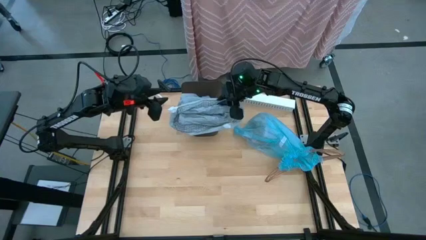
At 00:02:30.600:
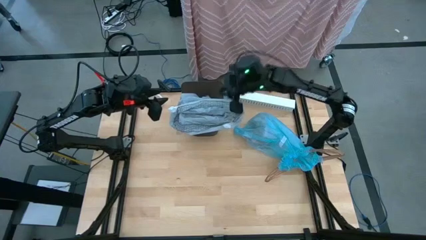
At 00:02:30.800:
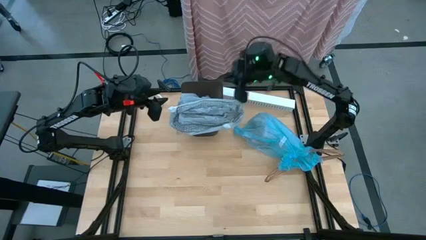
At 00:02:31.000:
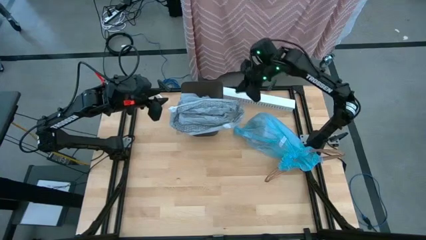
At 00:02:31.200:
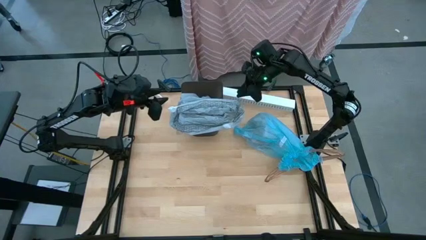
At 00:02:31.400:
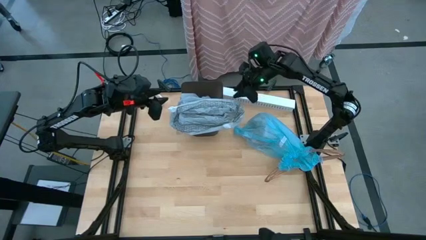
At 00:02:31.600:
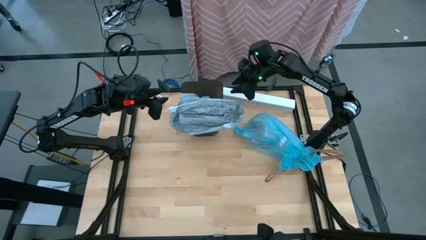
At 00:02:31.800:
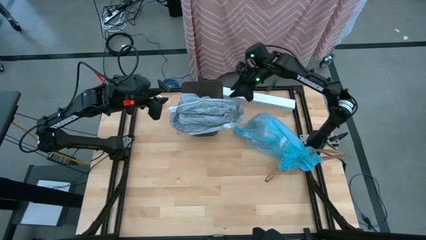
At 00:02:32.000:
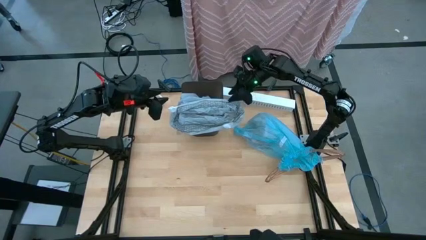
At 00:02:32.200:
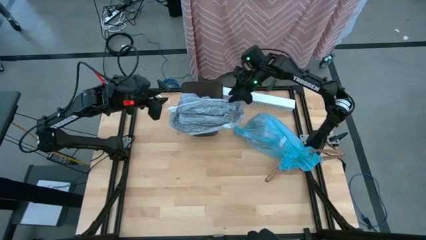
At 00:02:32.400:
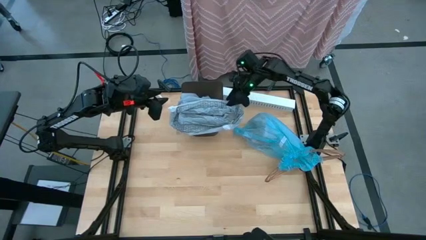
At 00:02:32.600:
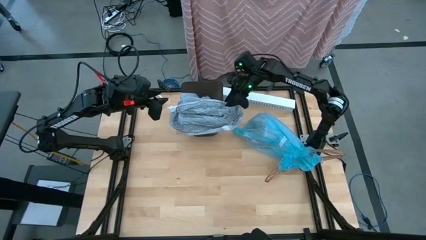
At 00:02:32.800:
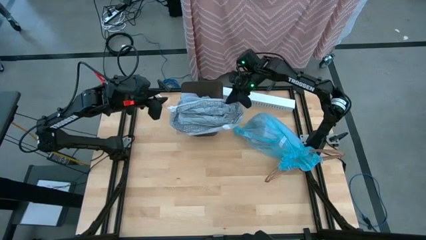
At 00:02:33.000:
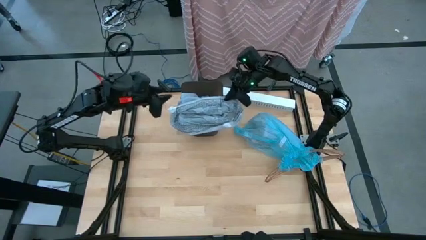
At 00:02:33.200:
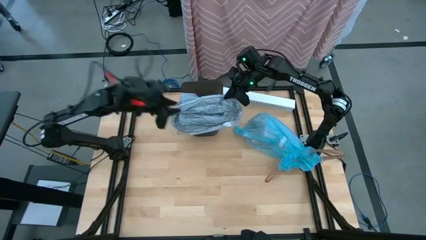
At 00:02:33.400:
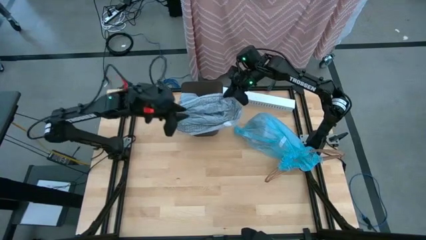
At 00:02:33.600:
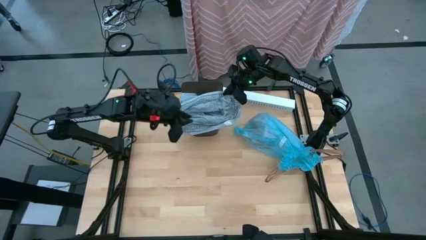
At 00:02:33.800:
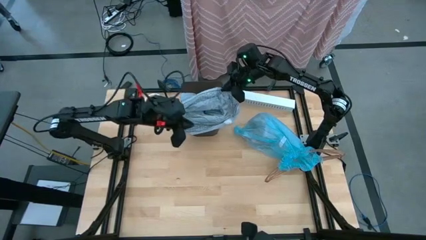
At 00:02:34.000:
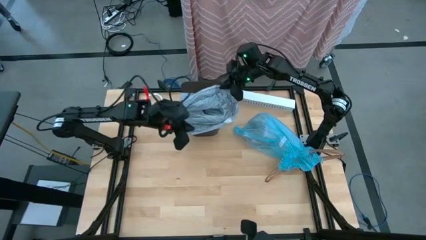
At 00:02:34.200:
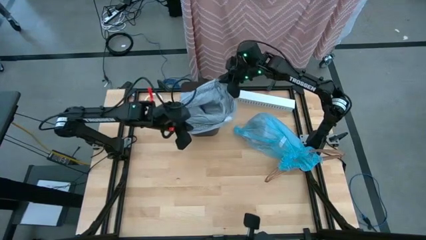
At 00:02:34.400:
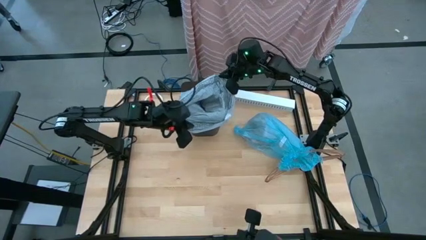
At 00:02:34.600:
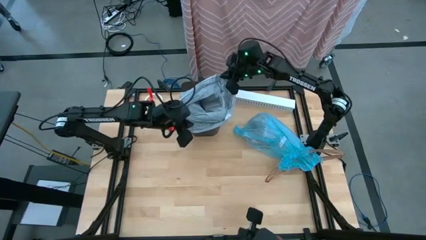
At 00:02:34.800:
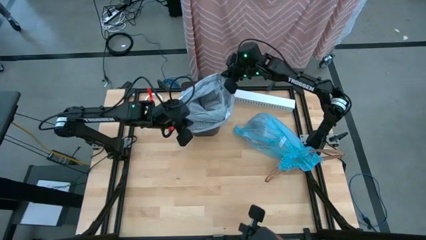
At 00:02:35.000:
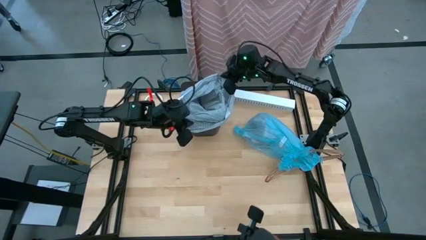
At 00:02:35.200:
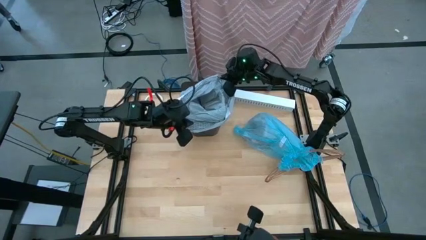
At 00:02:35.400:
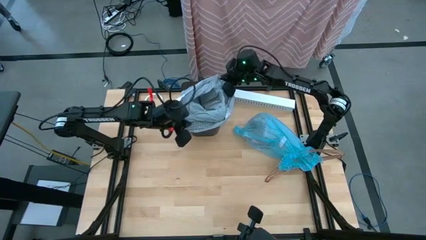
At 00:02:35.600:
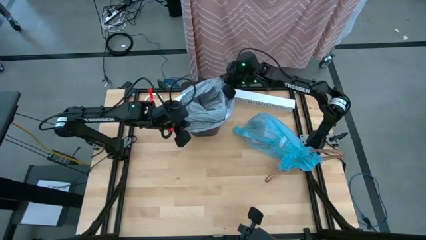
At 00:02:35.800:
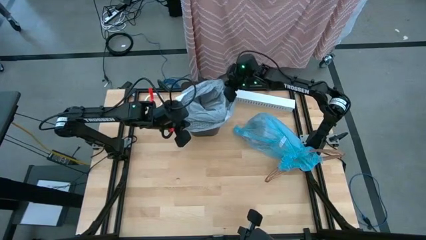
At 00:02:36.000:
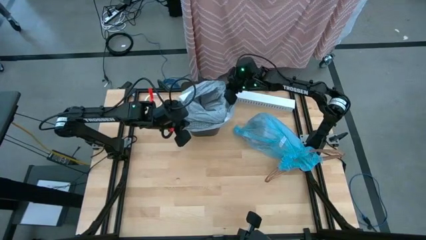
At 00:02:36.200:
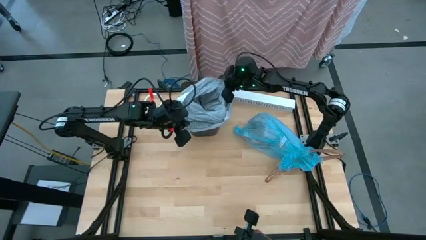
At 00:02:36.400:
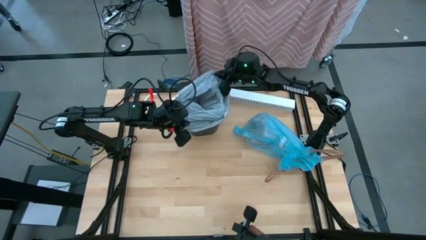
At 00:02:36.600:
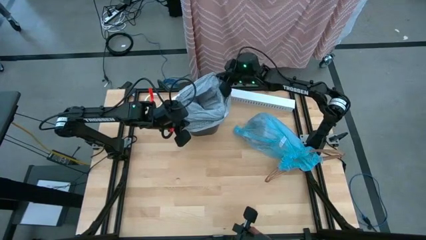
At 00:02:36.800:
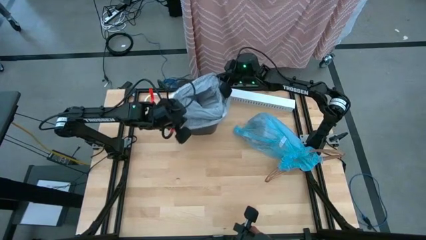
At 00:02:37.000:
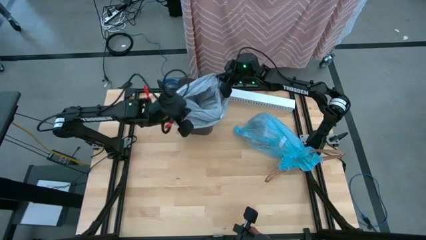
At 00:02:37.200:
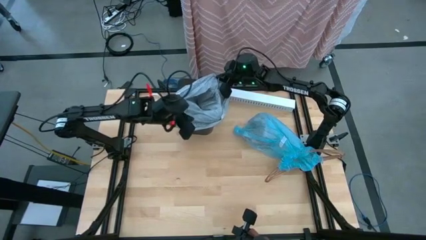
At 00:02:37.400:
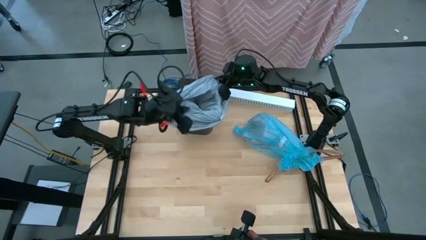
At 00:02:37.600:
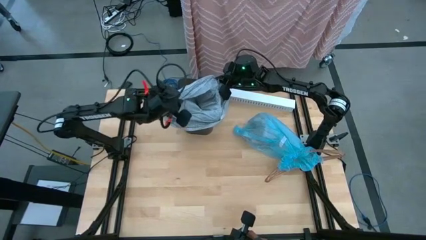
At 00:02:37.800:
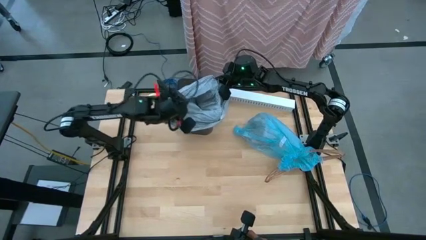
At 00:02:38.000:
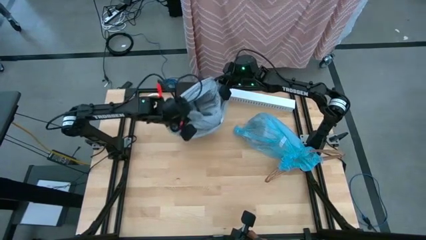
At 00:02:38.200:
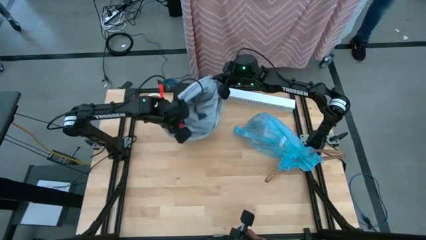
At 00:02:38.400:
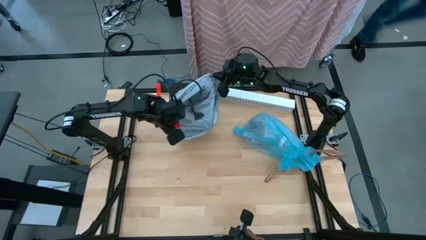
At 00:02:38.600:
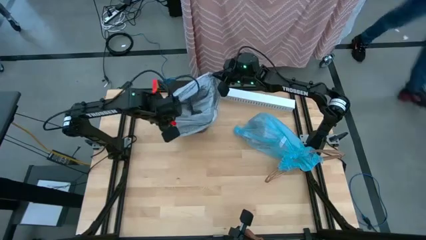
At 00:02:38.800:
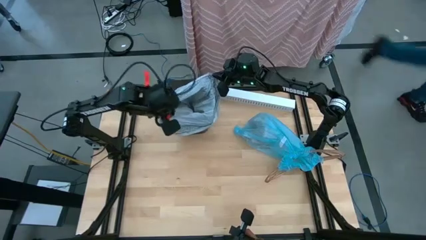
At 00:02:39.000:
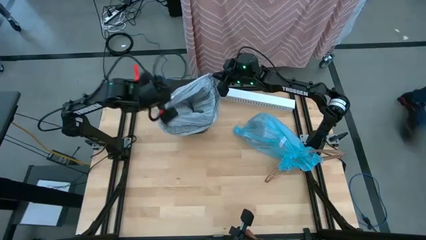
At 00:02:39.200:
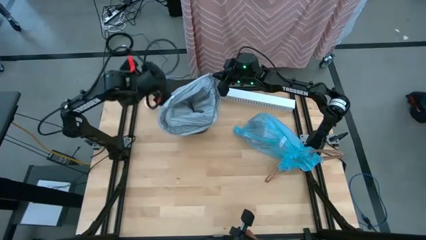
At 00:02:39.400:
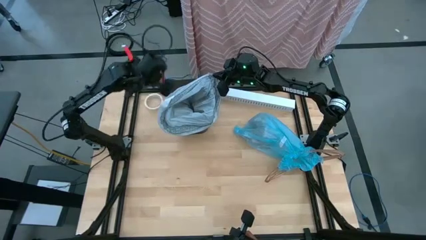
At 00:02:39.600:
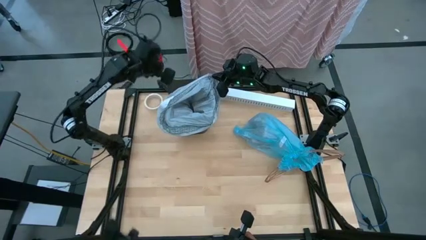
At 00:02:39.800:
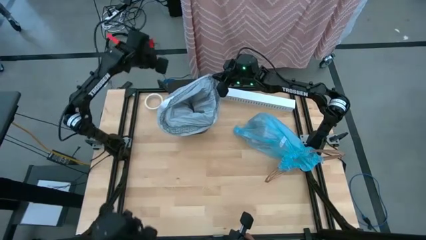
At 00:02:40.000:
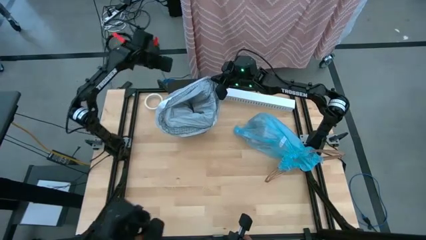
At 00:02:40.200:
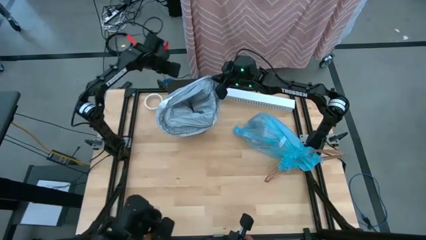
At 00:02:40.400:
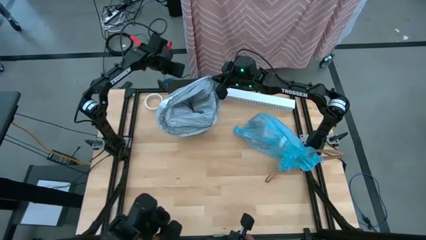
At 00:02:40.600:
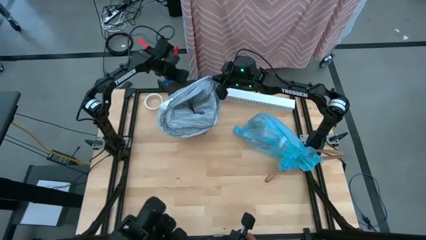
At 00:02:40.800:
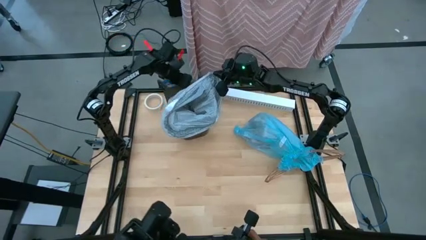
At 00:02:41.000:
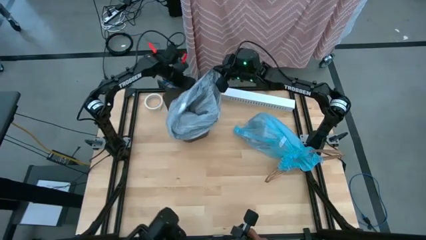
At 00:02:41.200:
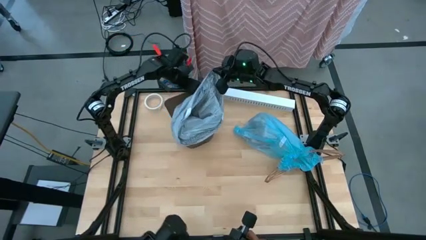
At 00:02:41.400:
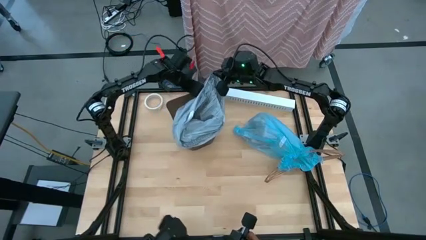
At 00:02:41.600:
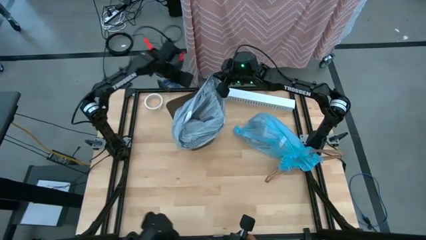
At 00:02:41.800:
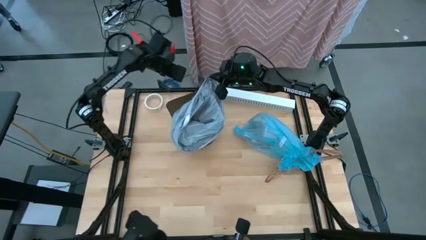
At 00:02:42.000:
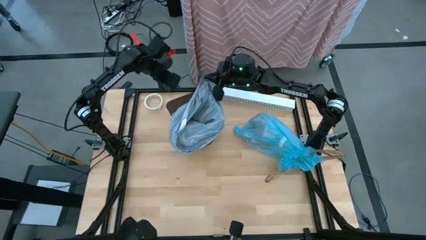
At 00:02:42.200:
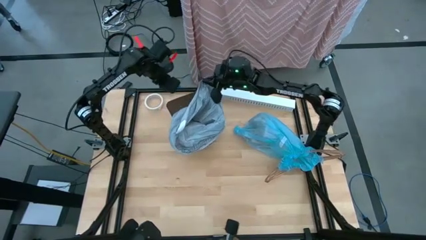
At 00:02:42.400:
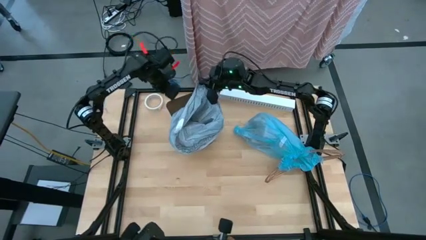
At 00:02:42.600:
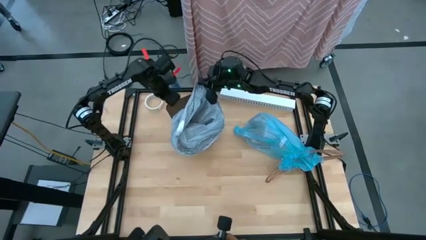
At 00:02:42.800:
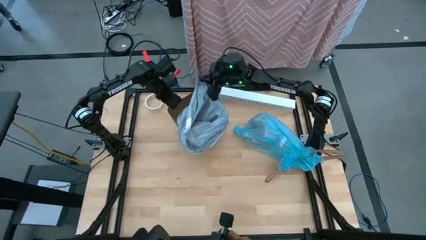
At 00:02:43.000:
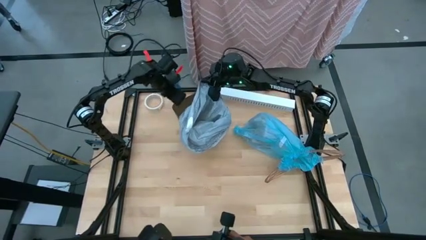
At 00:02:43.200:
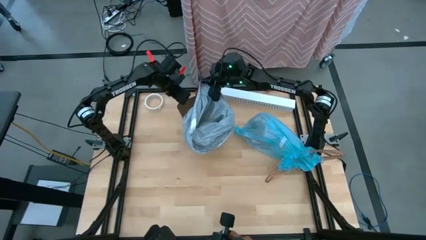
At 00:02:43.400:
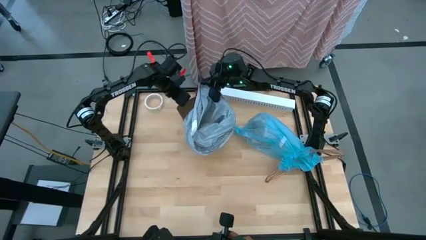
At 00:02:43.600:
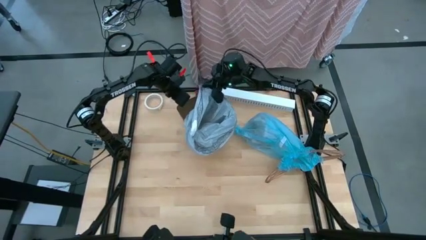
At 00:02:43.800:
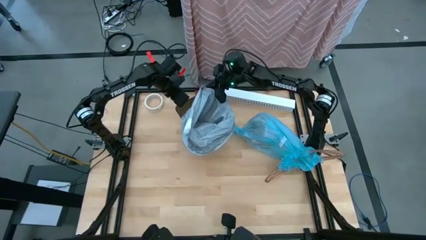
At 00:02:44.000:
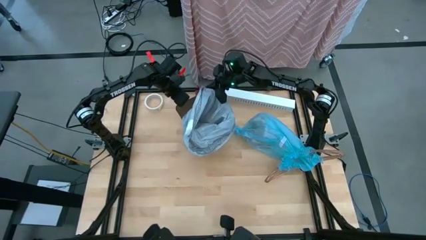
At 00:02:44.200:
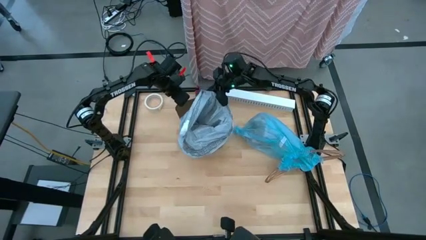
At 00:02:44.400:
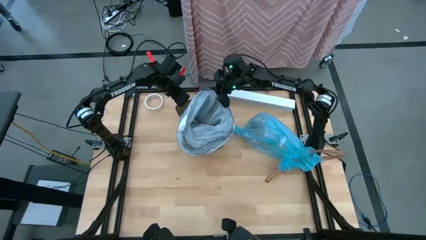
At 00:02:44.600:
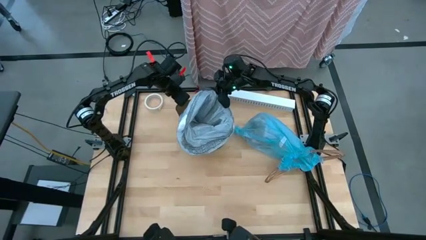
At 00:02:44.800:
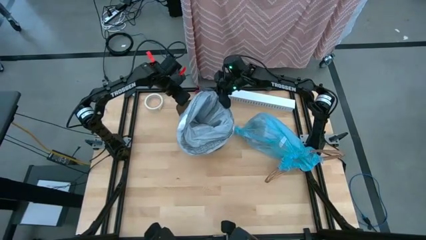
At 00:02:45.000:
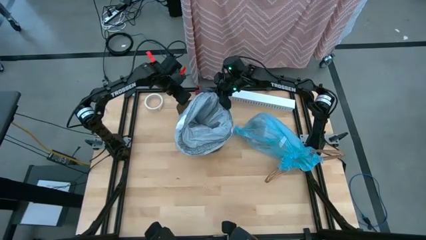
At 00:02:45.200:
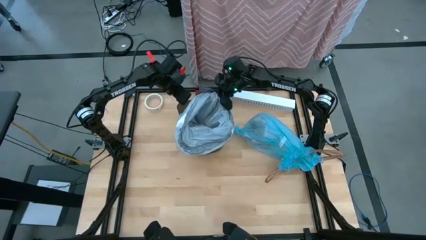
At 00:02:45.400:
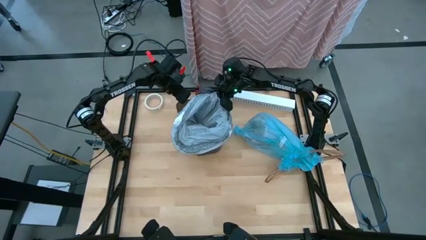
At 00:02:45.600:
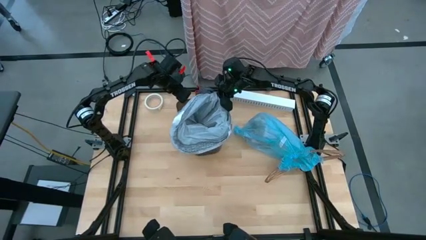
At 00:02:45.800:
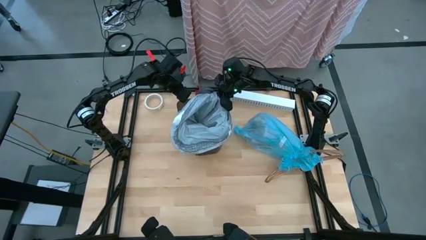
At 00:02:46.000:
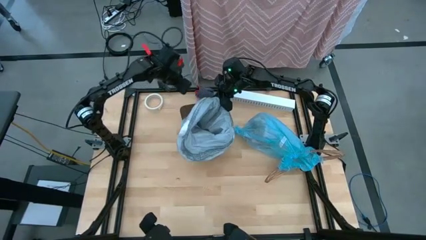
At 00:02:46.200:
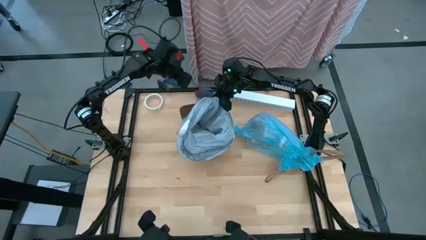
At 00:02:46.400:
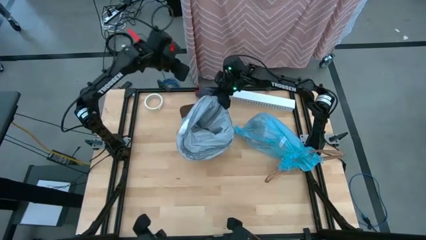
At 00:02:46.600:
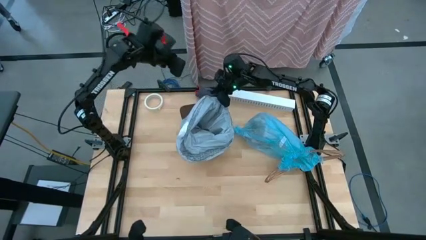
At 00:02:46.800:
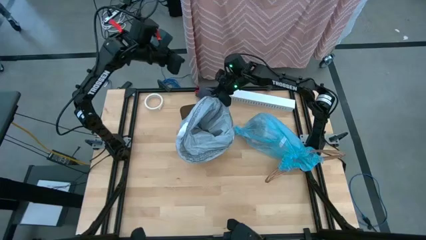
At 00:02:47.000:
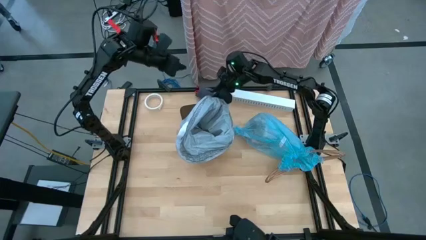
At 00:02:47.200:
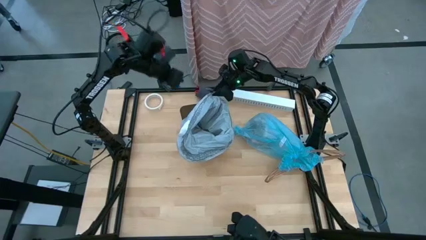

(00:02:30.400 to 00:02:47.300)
Task: place trash/remove bag and relplace
Insert the new gray trash bag into the bin
